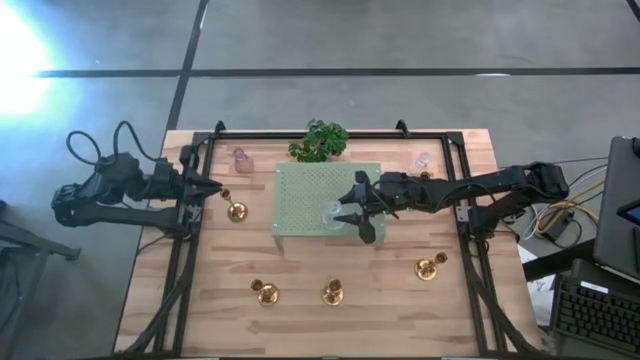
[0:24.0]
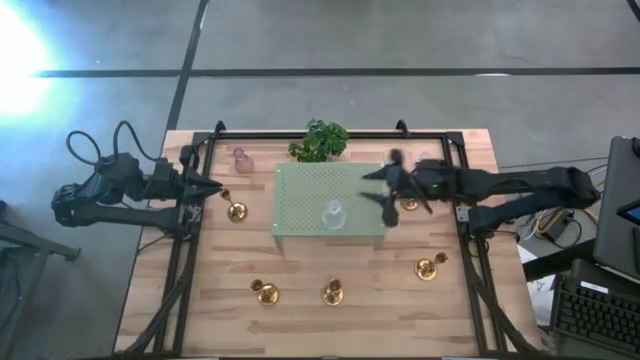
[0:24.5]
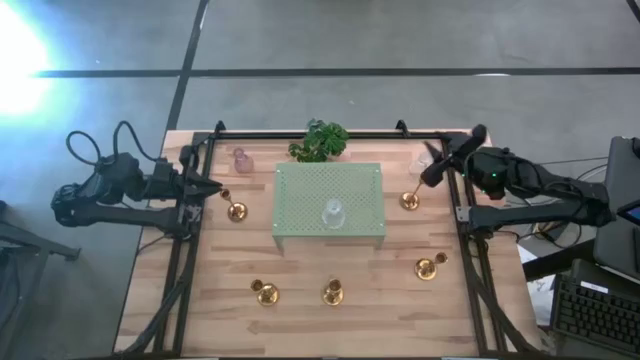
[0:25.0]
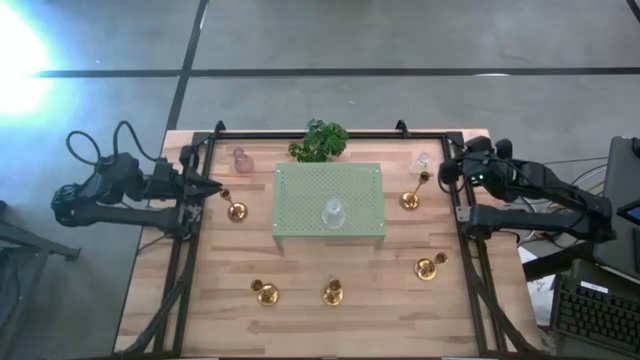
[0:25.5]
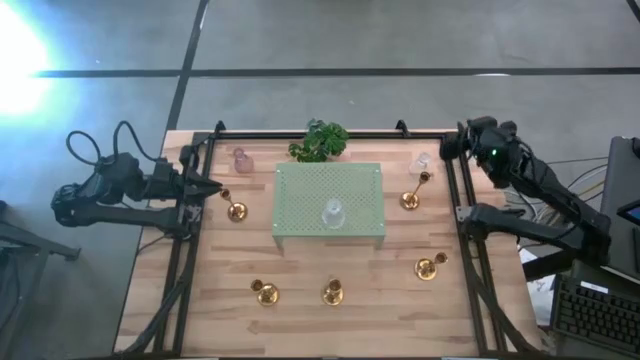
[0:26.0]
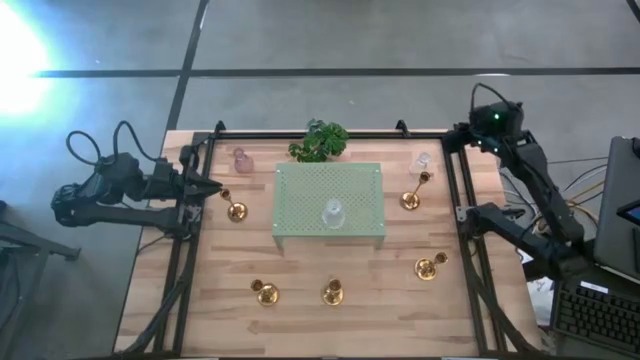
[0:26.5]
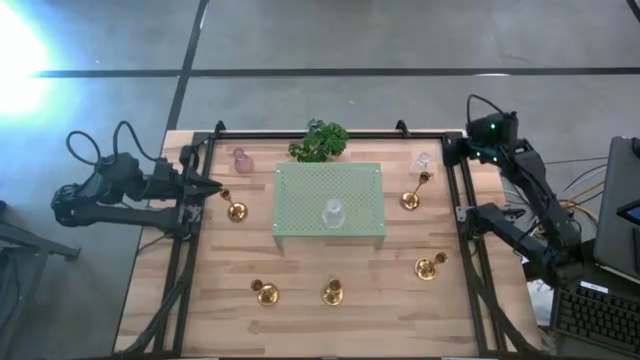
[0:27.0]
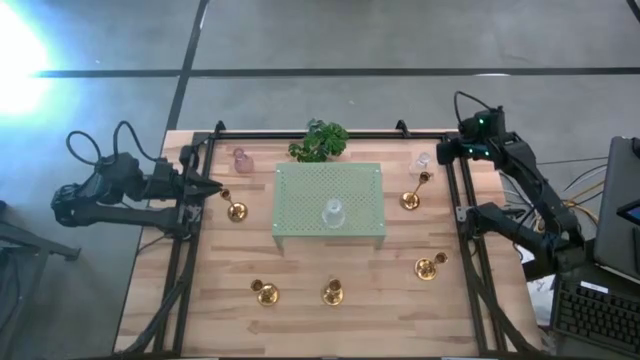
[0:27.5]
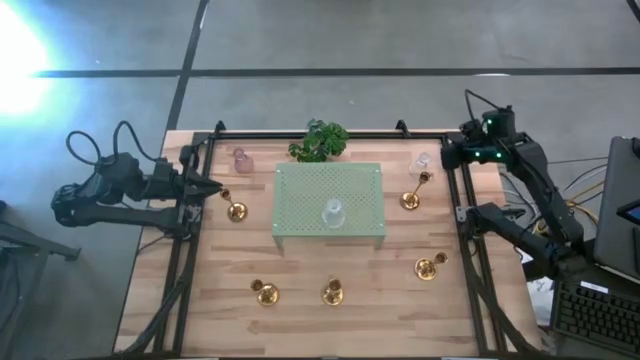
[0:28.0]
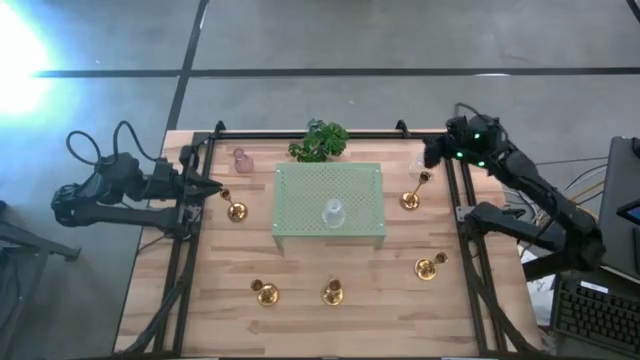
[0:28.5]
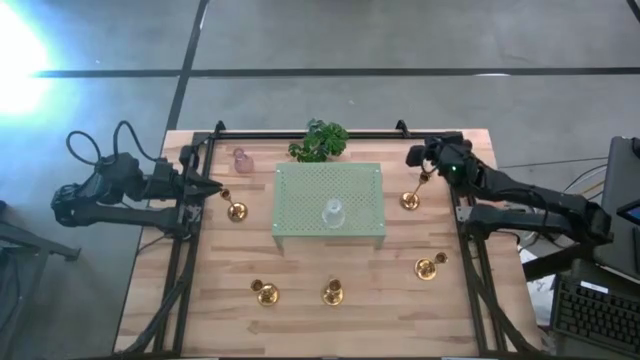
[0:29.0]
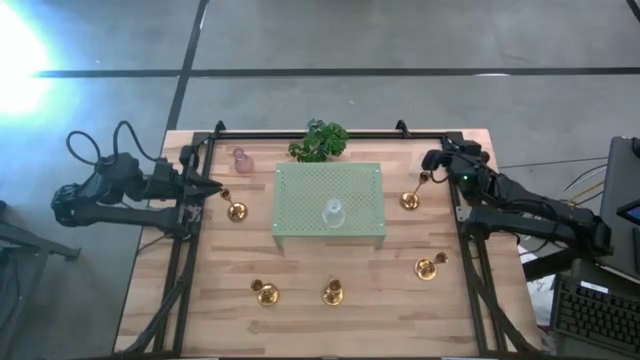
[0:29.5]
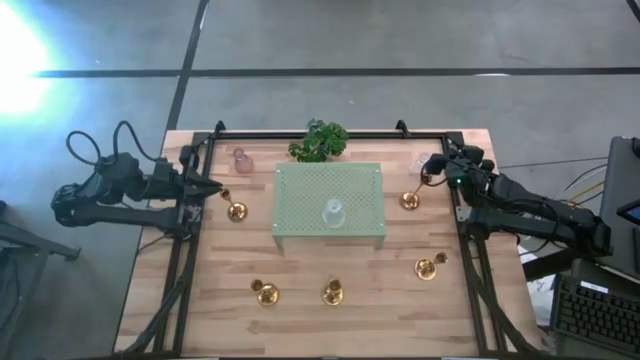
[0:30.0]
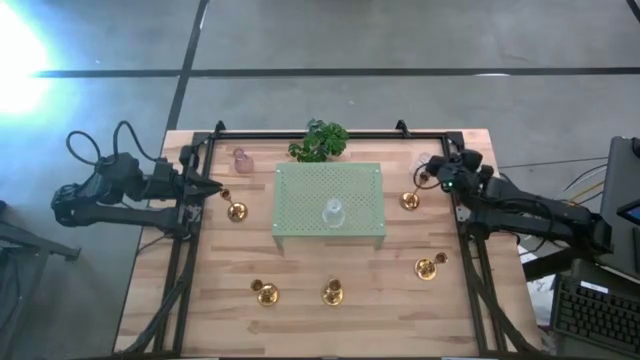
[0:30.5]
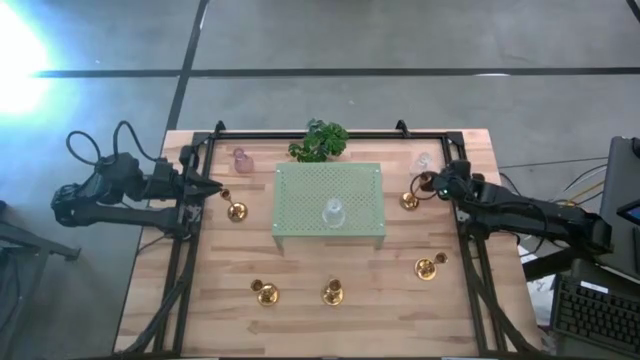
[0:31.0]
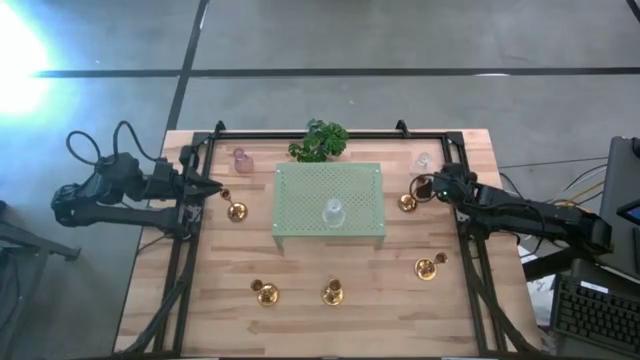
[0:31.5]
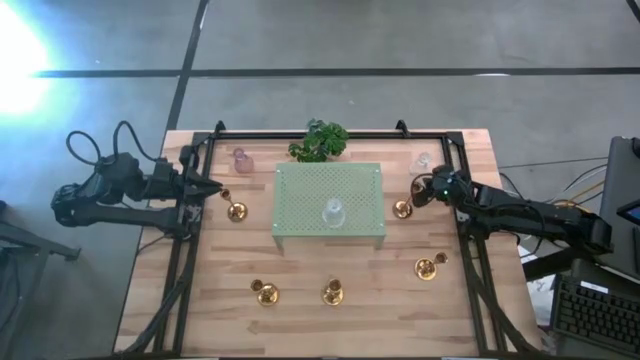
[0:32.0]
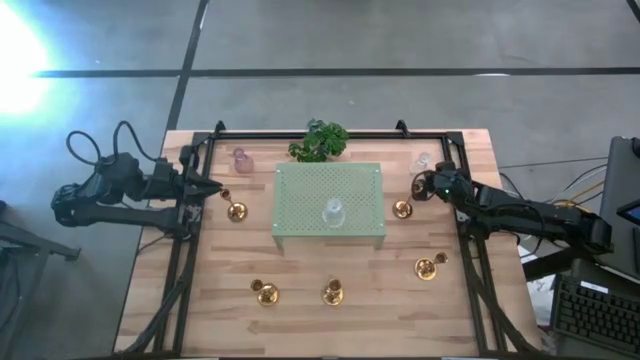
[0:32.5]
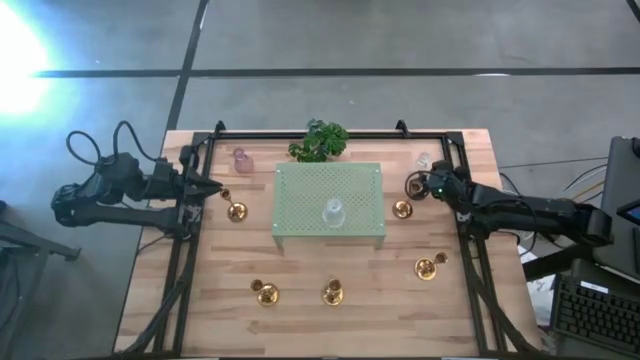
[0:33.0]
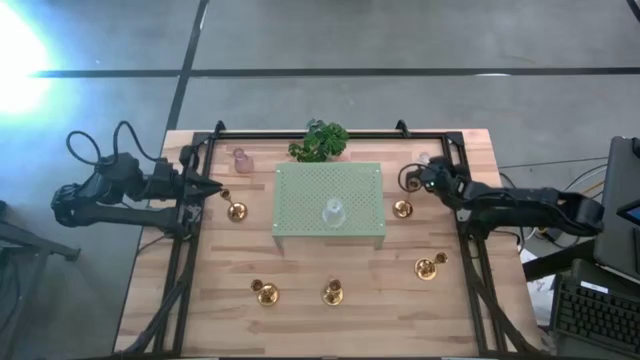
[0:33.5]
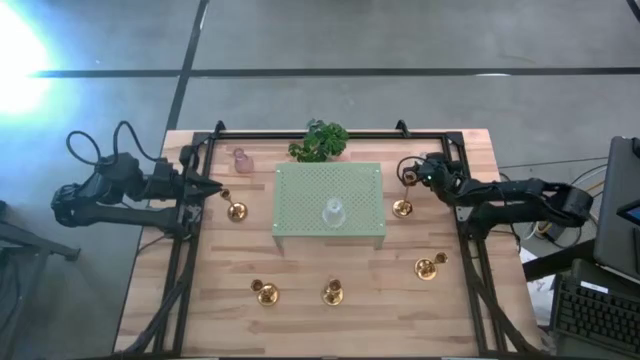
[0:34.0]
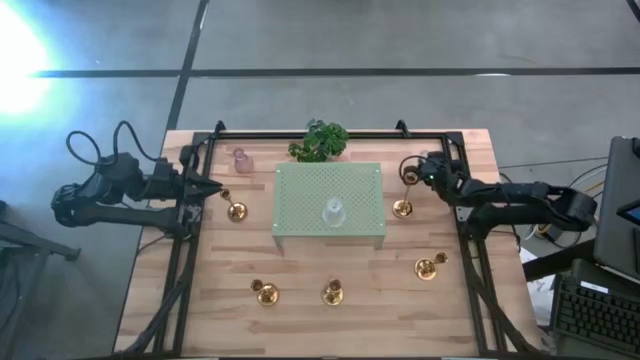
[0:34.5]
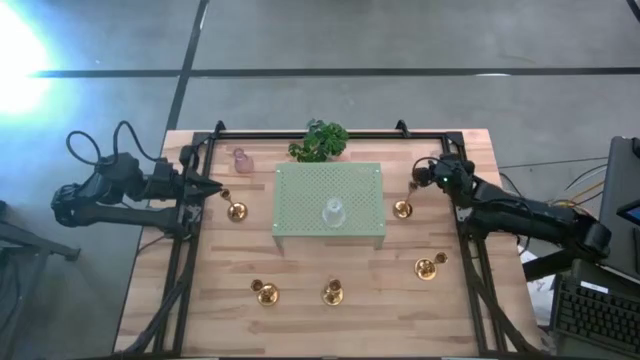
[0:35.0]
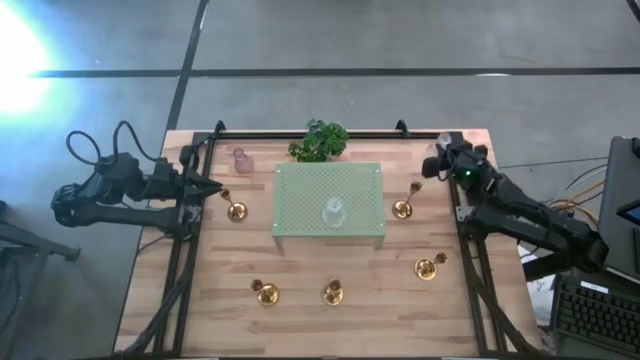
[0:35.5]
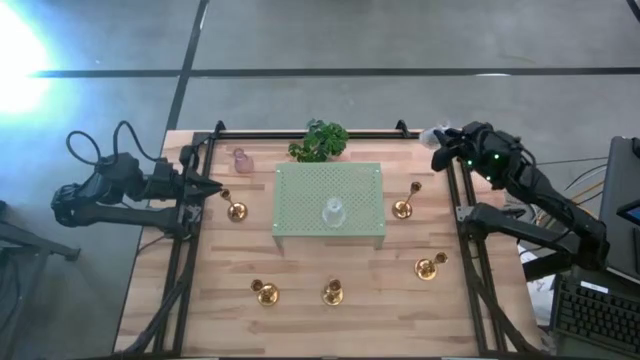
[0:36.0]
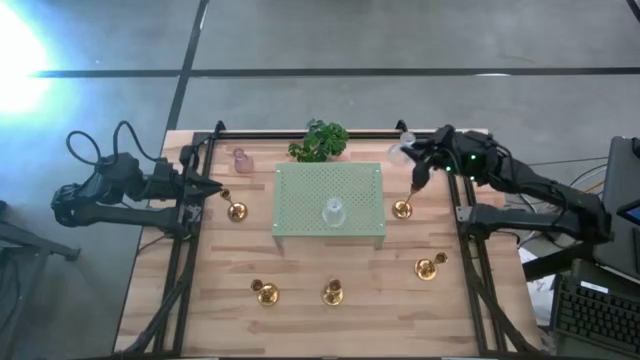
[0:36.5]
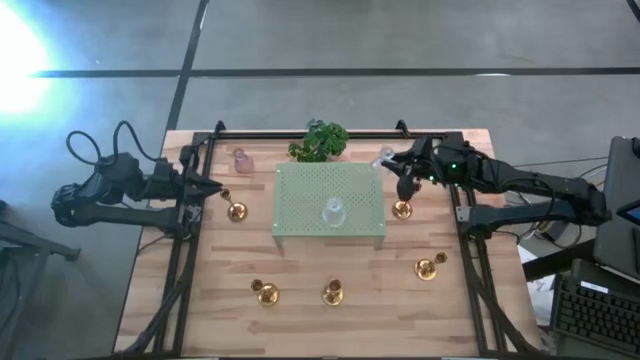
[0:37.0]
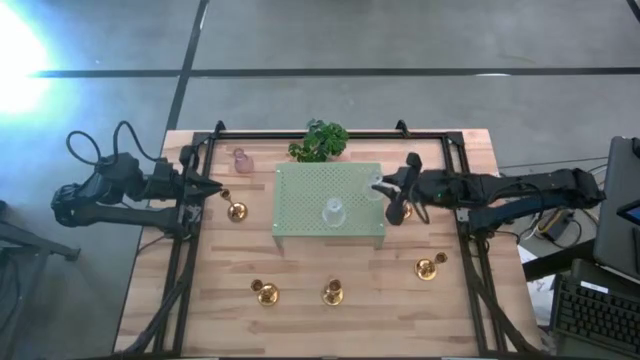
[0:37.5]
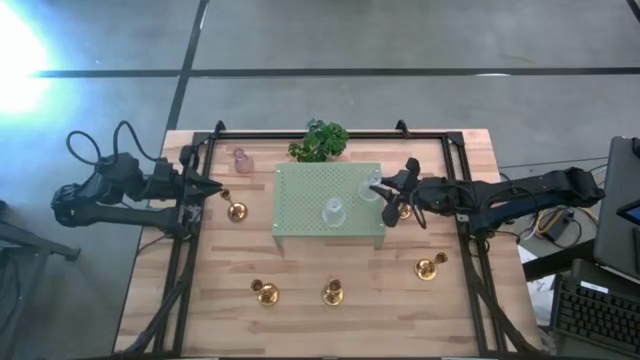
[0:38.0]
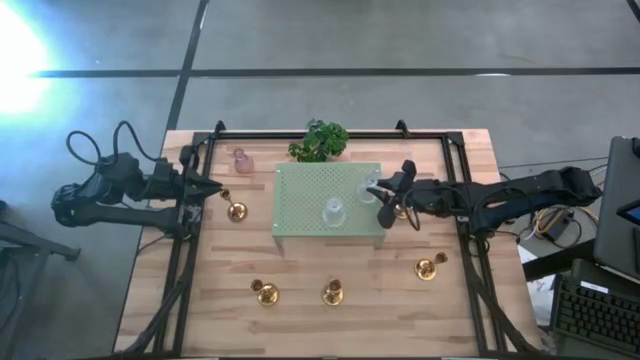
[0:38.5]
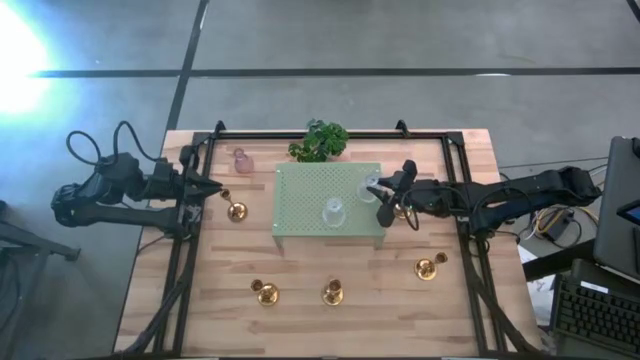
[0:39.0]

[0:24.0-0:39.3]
Task: Pick & Place candle stick holders
Put the transparent candle holder on the shelf
